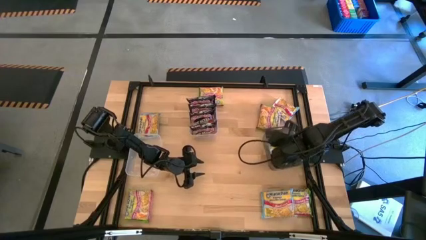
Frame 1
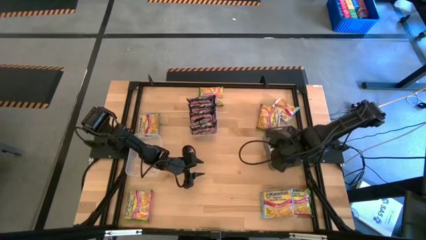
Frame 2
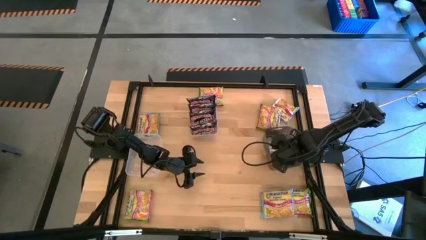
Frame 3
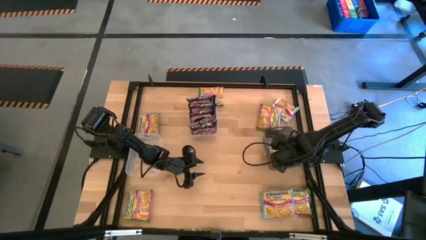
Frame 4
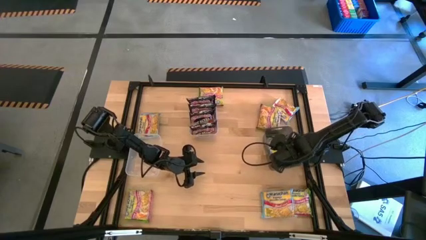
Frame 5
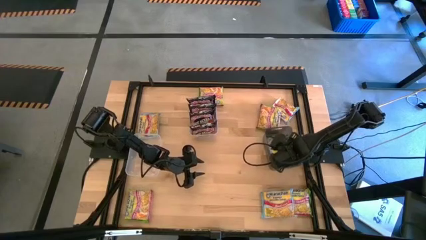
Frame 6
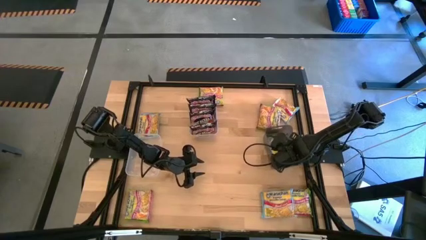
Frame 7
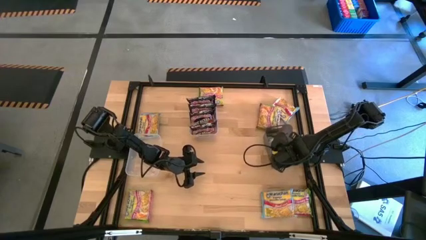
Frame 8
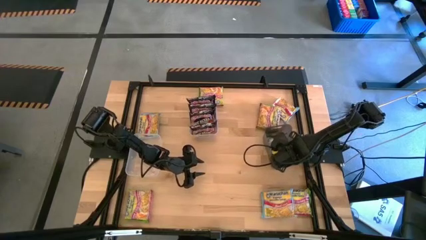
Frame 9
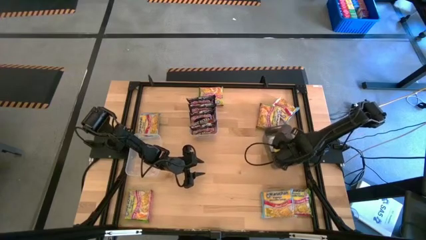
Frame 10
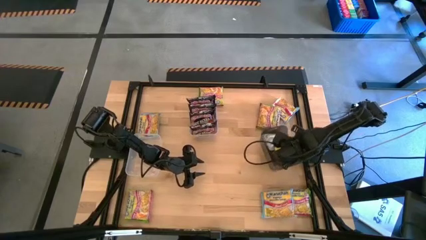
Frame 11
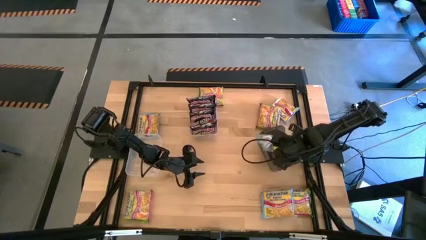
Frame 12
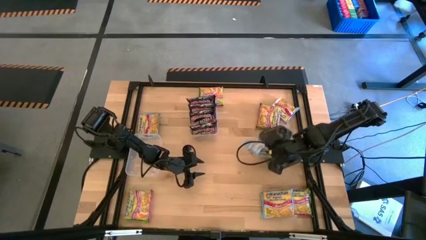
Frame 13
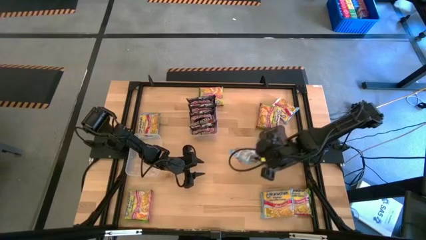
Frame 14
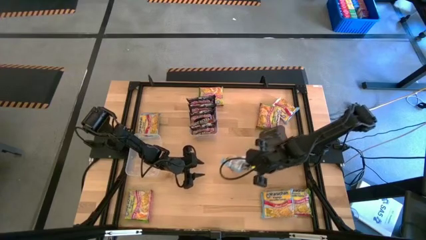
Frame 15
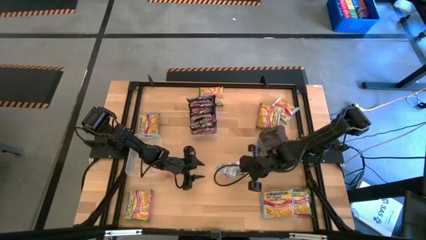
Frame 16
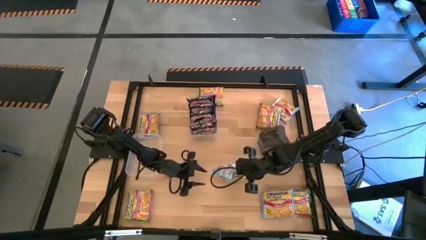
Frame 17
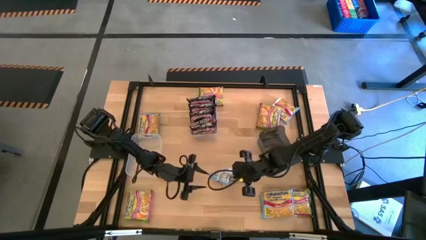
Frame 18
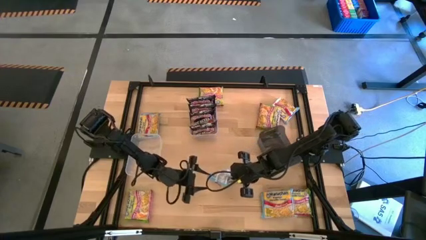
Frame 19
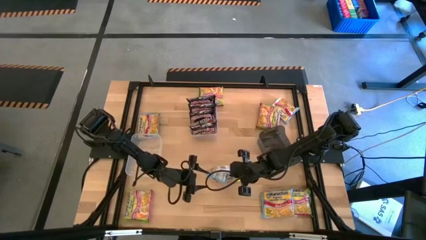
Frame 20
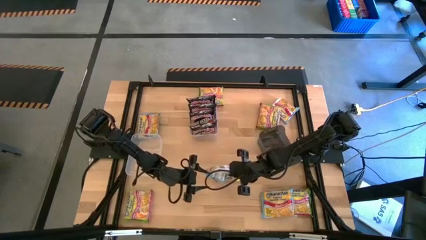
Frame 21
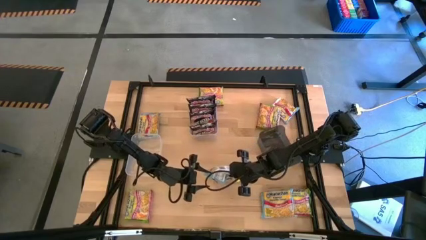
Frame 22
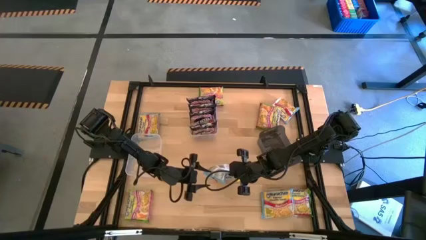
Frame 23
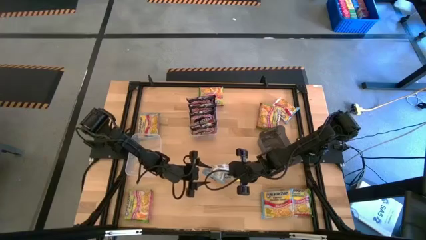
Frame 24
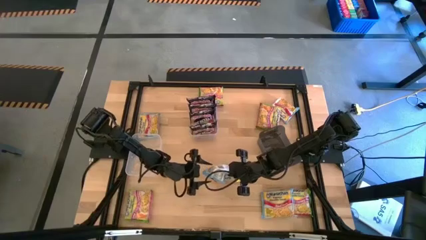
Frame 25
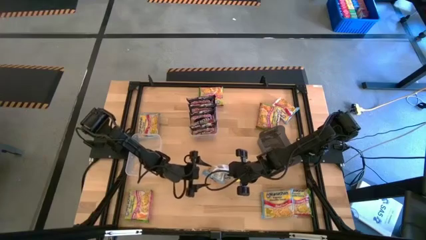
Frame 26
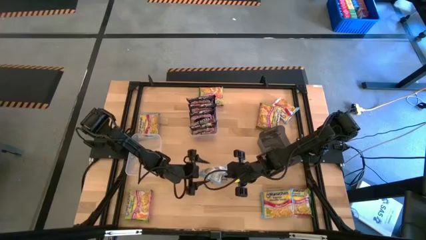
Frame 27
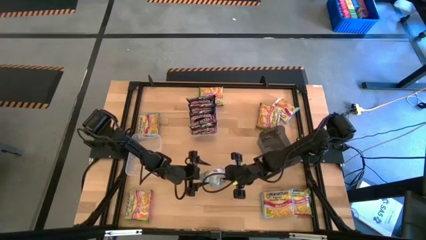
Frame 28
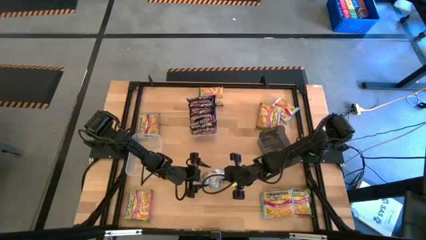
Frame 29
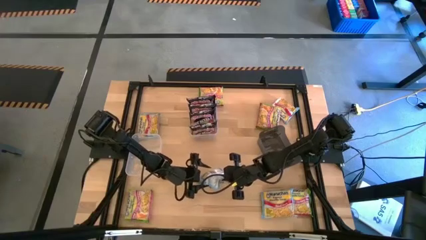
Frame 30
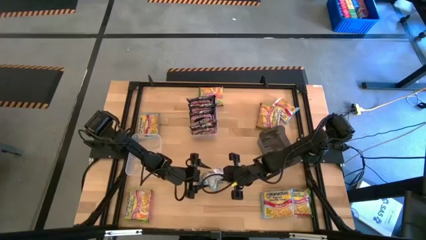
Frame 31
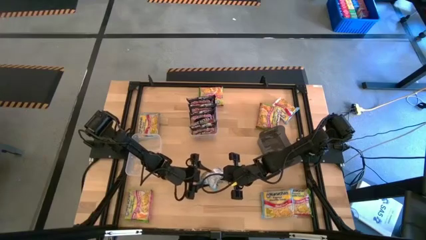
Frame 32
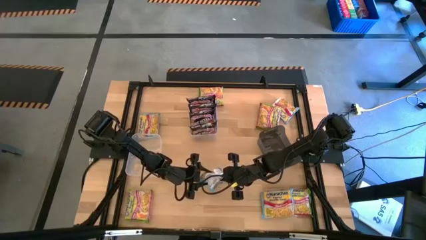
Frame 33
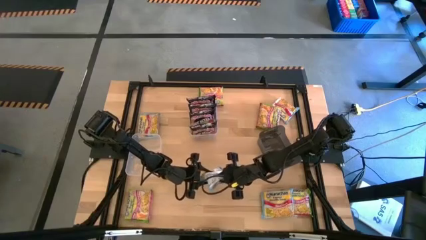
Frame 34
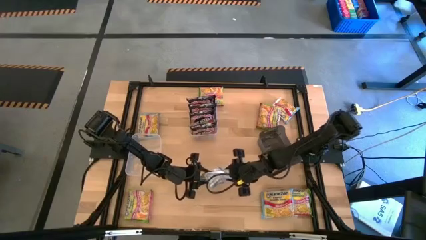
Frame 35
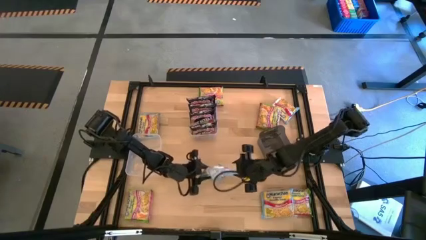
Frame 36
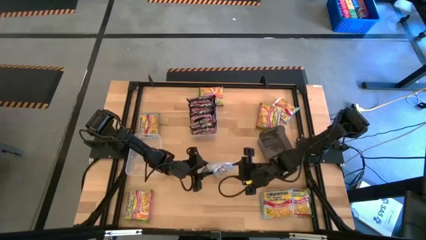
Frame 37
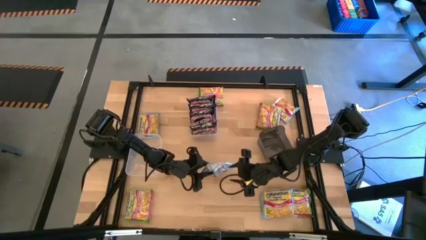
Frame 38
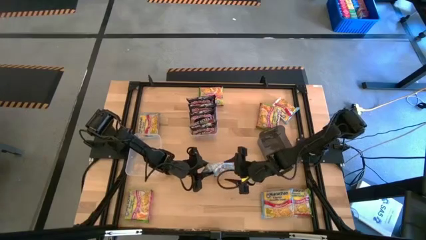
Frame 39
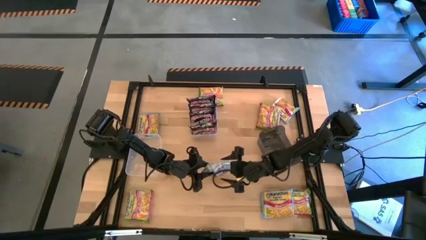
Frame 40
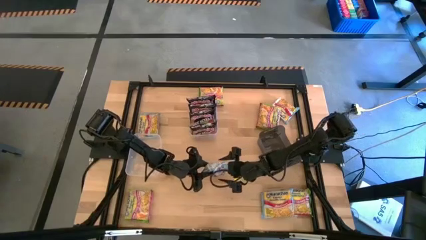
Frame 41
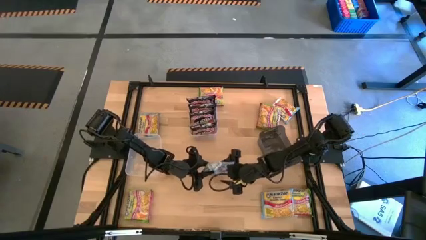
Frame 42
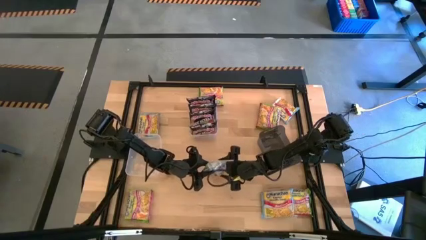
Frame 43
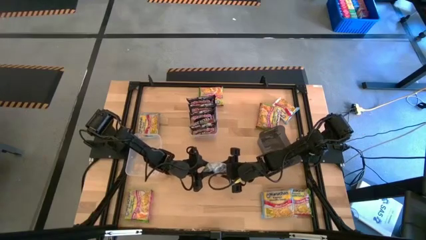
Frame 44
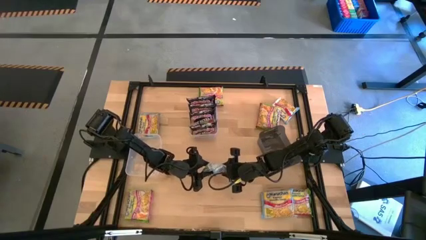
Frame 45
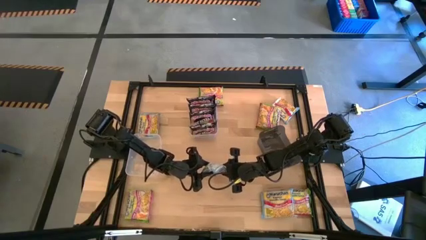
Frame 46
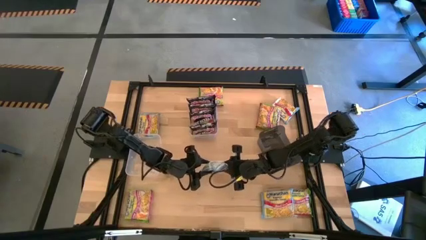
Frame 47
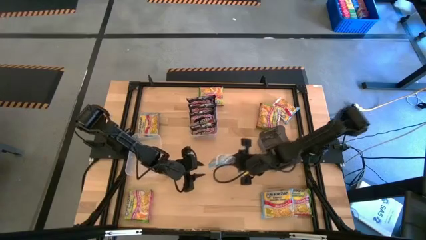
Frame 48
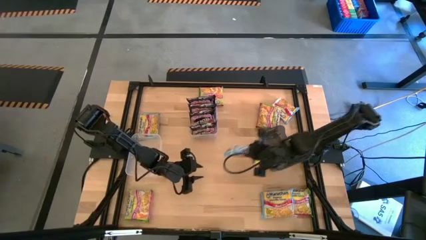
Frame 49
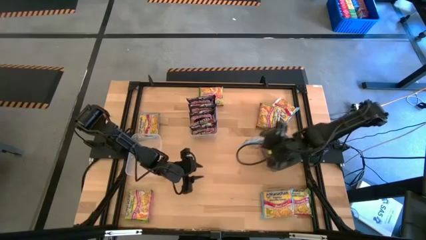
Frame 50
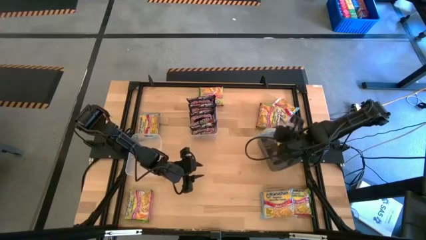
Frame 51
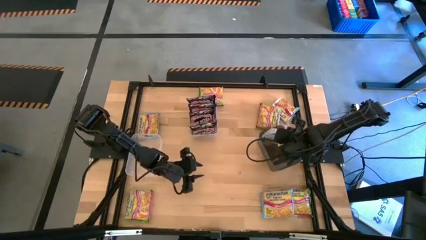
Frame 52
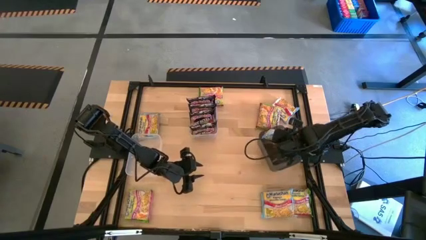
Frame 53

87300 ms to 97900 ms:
Task: Sort Maruchan noodles
Put the blue noodle pack into the black bin

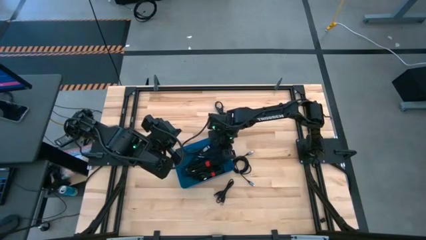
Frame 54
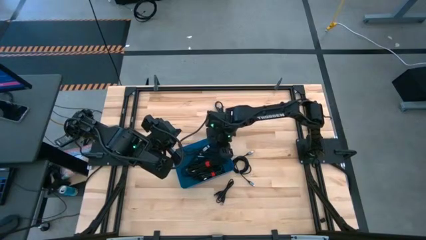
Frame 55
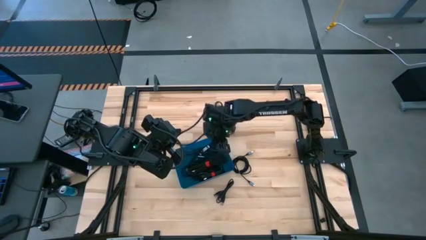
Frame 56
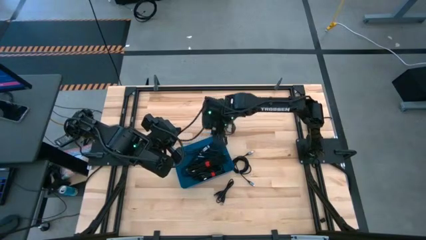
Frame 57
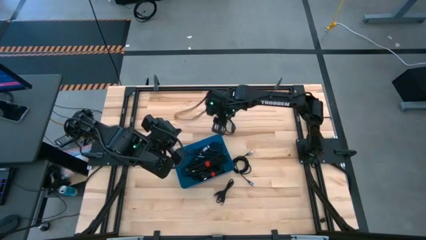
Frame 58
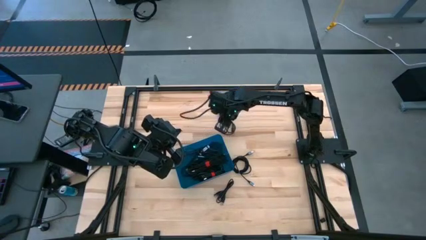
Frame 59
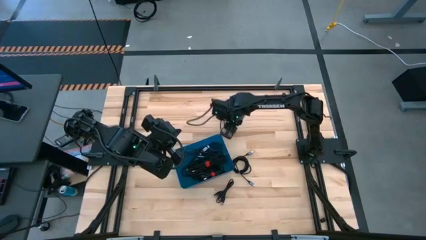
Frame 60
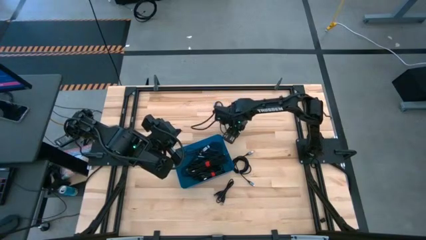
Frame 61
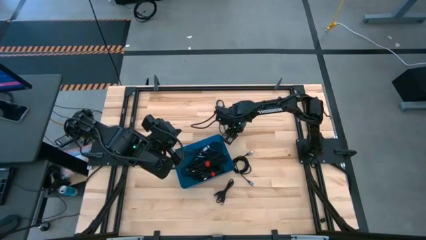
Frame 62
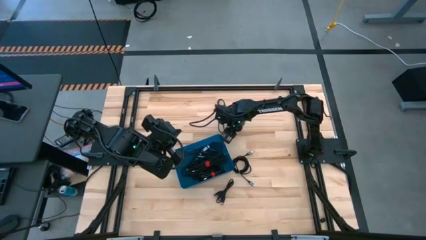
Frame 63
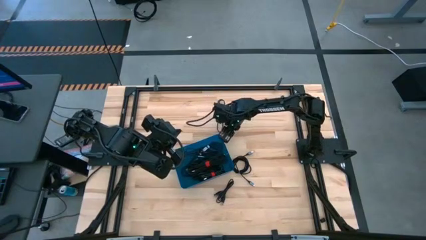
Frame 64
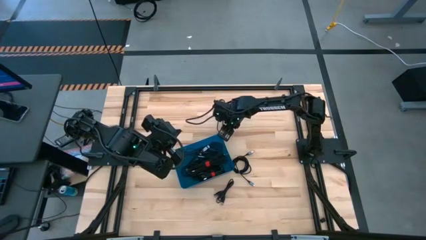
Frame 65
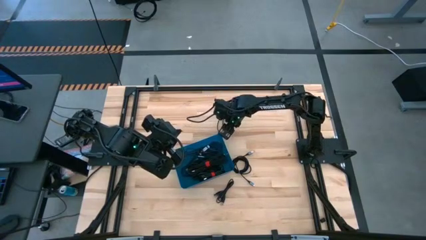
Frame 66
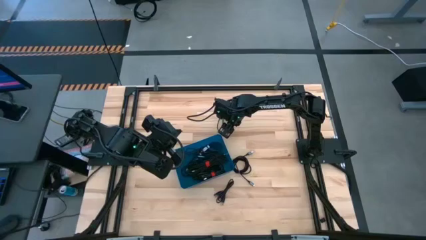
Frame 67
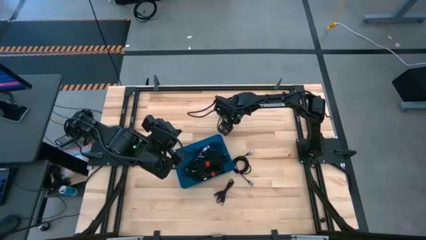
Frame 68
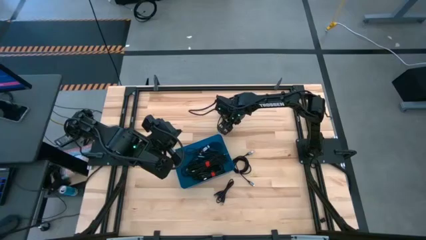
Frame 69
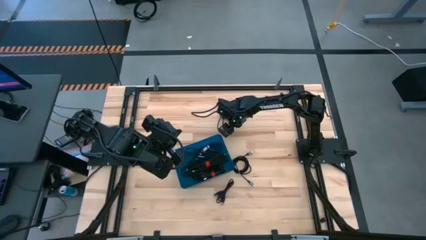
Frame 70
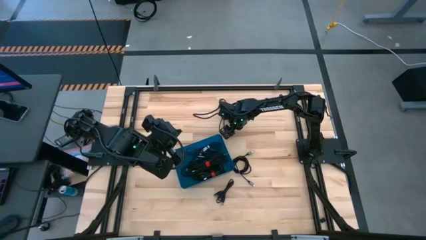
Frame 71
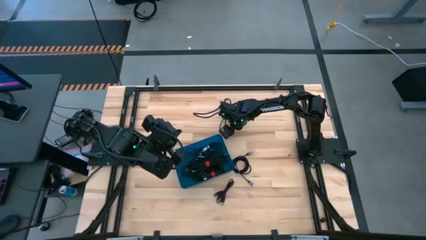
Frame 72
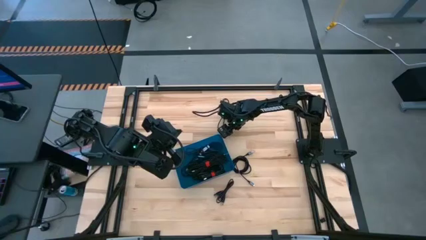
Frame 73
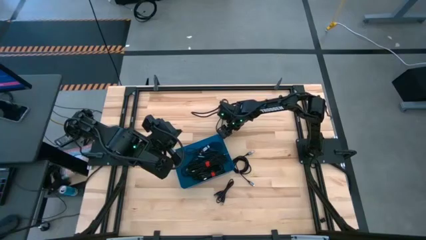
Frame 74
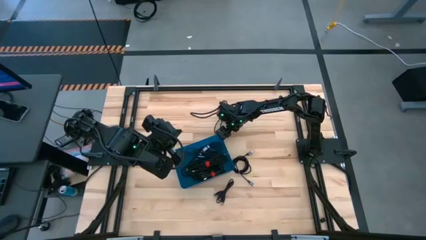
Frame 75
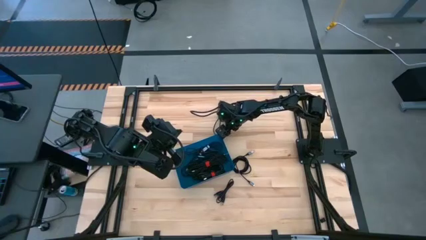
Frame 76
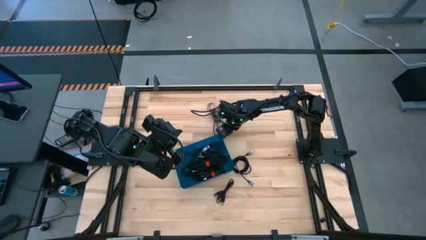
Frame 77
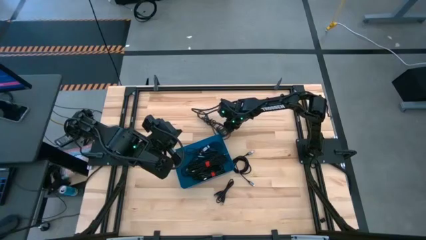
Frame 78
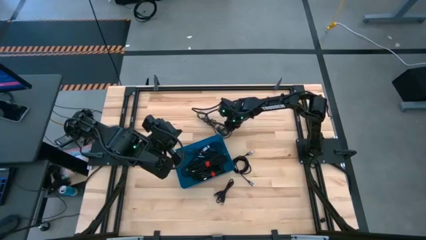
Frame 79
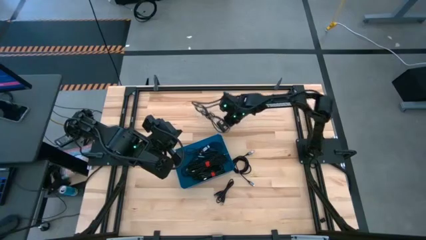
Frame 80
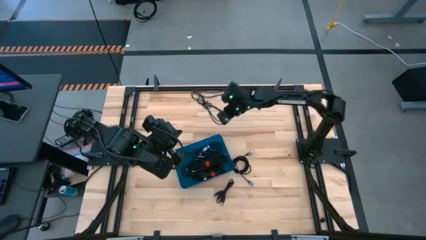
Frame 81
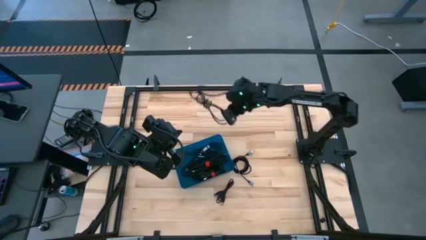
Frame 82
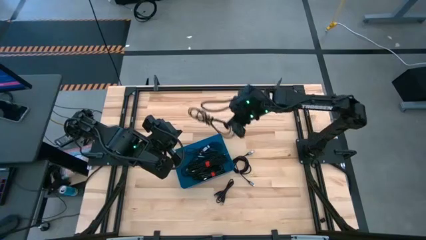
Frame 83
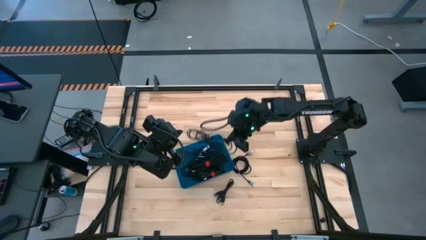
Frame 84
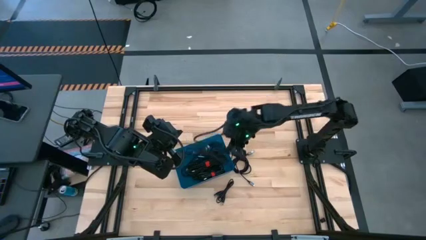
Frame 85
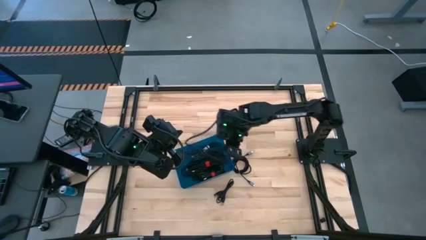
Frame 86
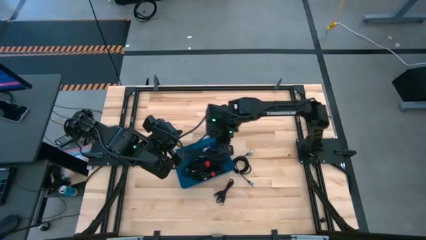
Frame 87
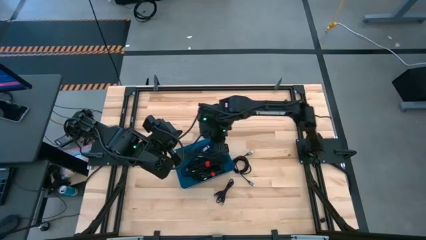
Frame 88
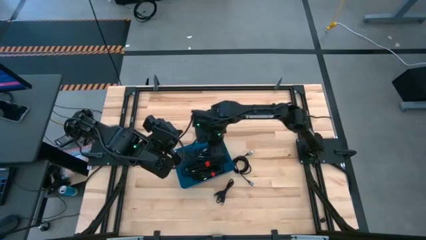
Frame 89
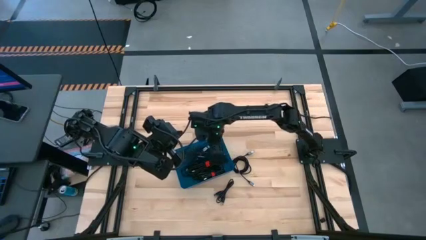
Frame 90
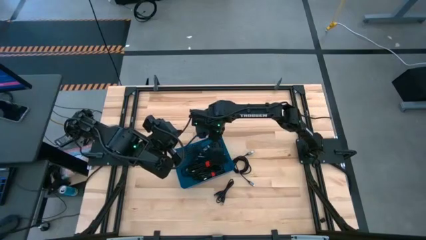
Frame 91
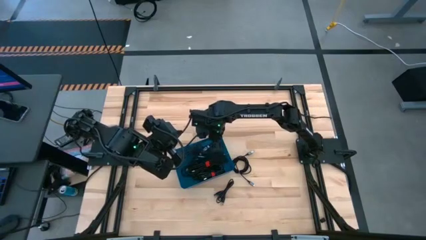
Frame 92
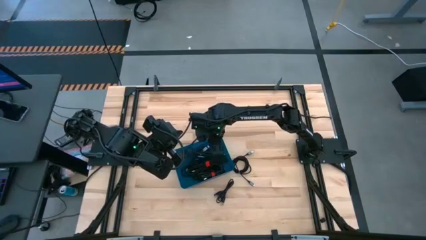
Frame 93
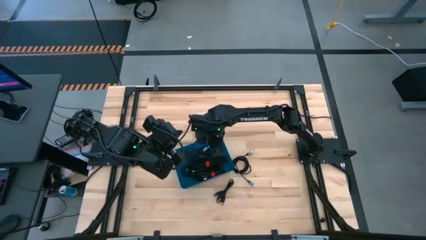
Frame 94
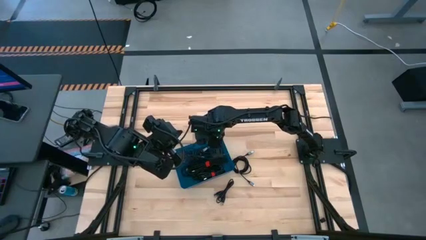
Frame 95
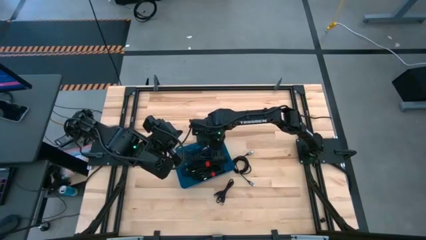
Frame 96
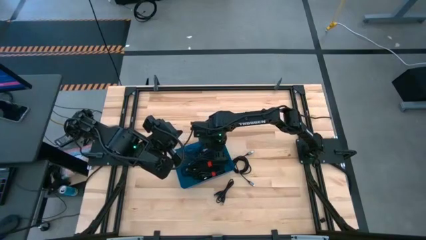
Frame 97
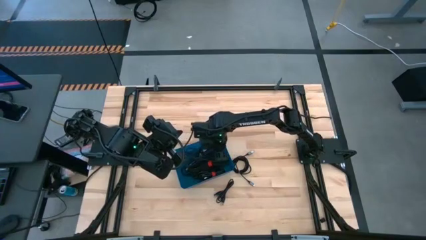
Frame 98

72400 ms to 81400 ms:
Task: Pick and place USB-C Cables
Put the black charger cable into the blue bin
